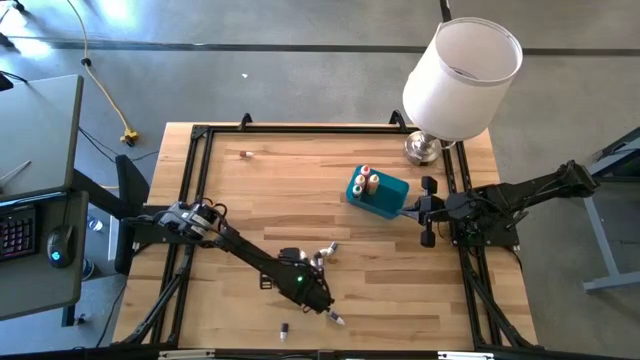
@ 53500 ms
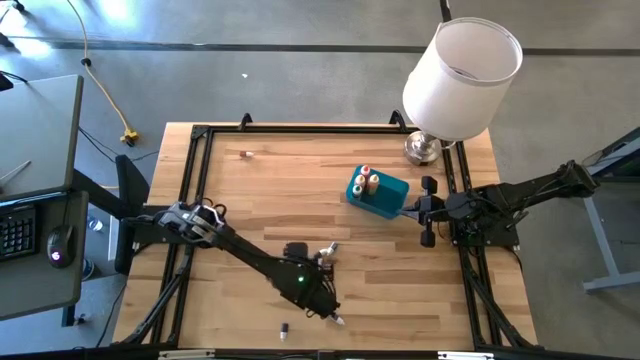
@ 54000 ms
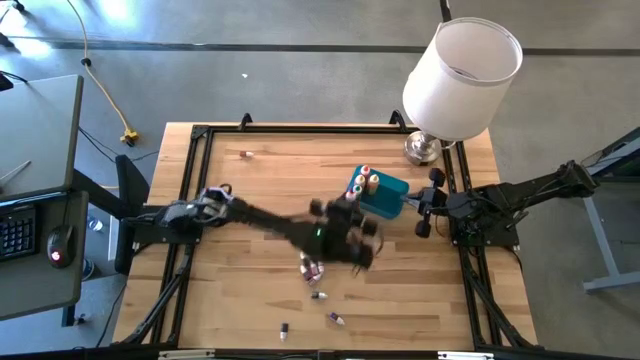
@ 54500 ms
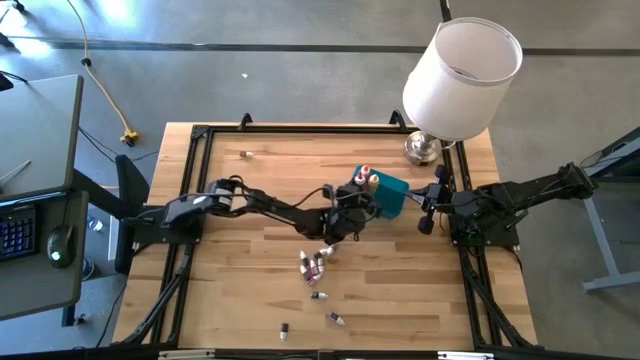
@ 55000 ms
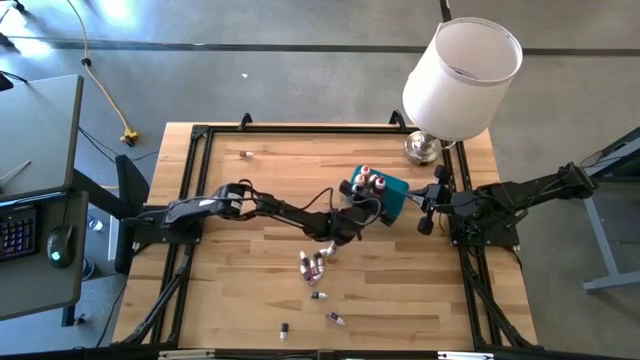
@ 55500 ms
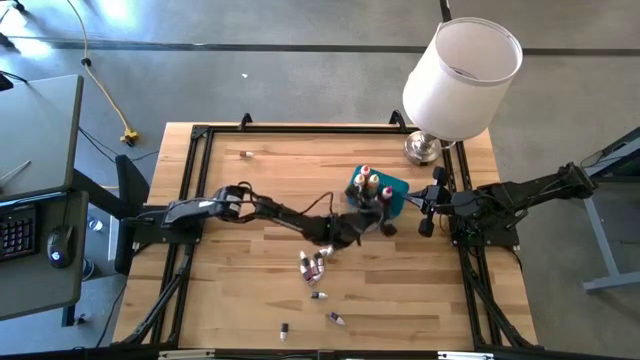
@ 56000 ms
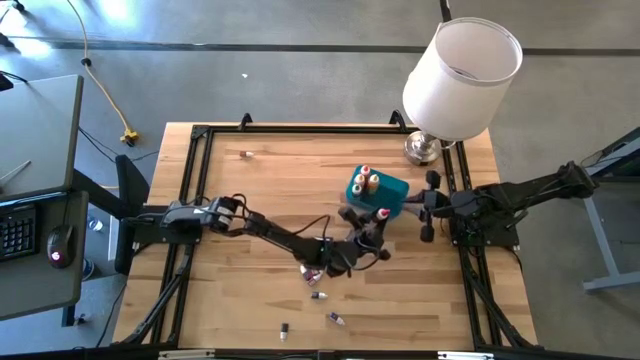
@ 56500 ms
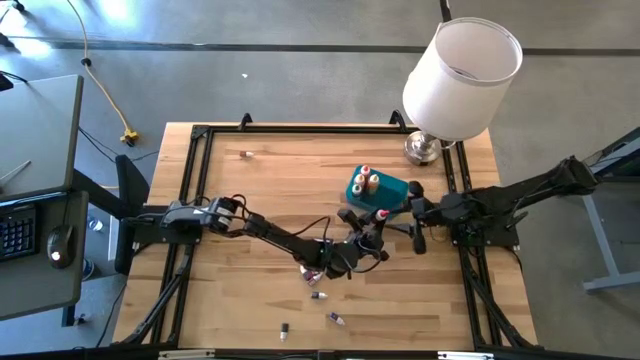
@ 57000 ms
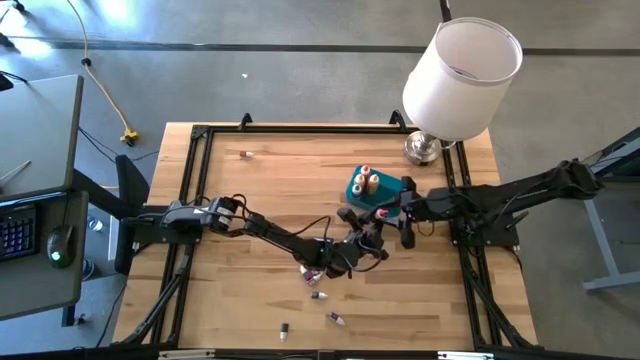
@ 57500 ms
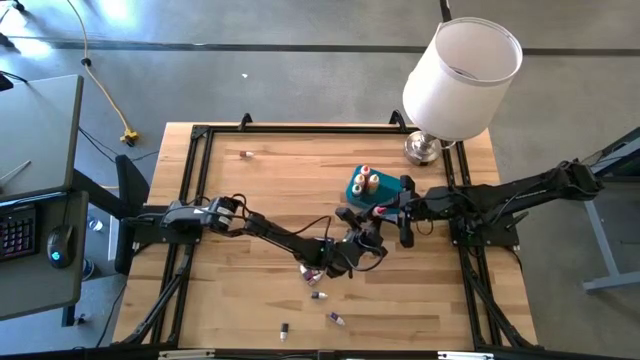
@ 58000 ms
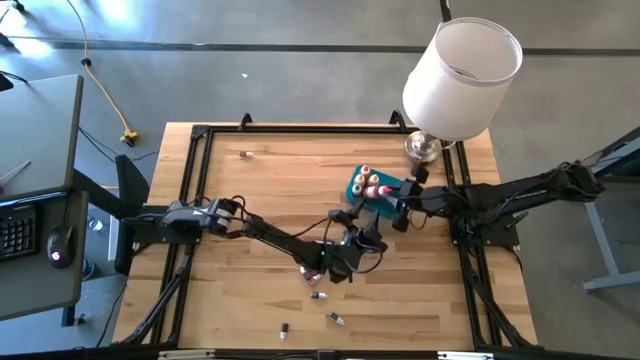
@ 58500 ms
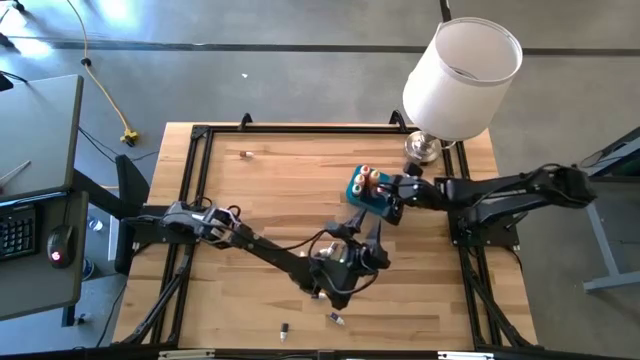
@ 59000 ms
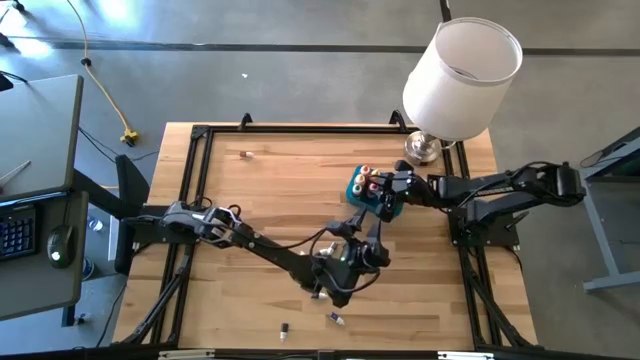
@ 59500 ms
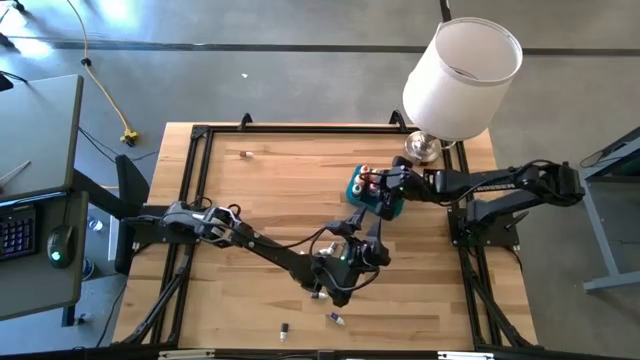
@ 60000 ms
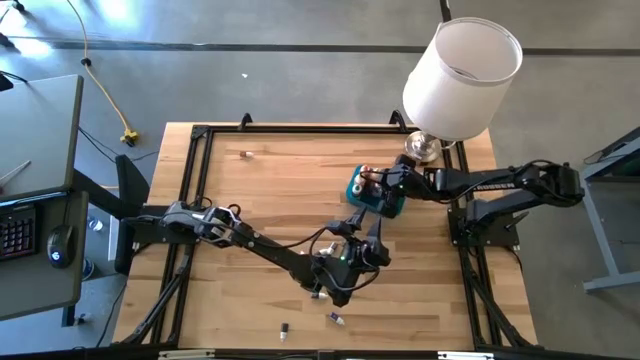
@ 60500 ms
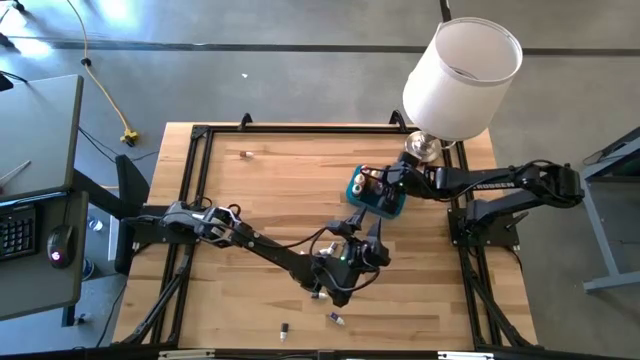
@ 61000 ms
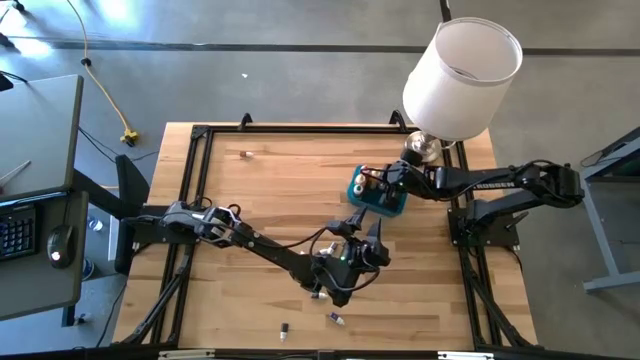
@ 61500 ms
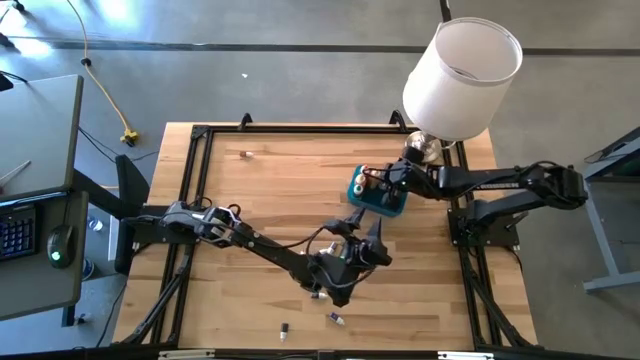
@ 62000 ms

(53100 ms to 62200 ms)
Task: Pick & Place food coloring
Put the large red food coloring bottle into the blue bin

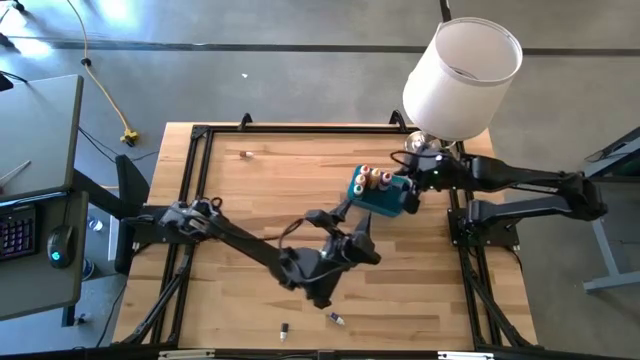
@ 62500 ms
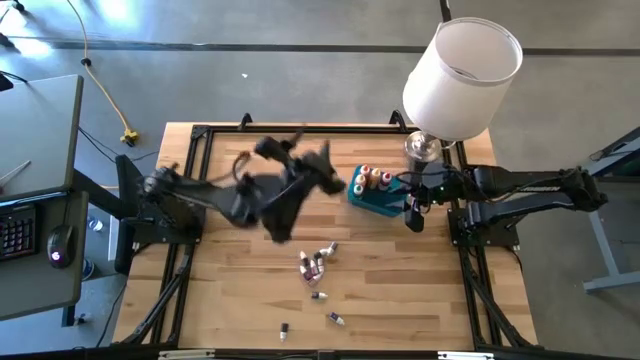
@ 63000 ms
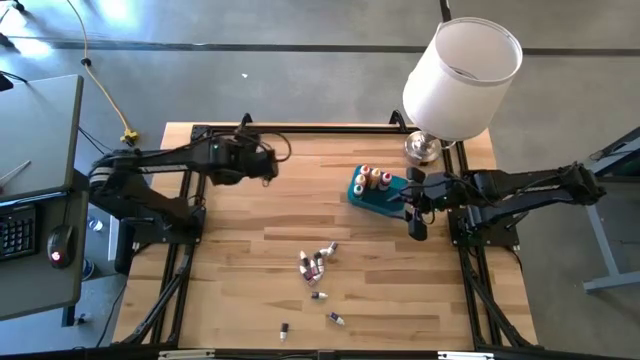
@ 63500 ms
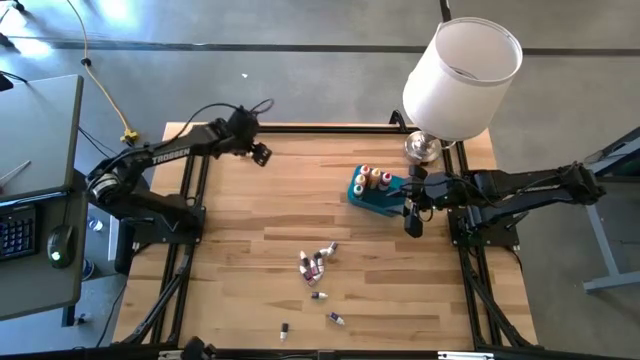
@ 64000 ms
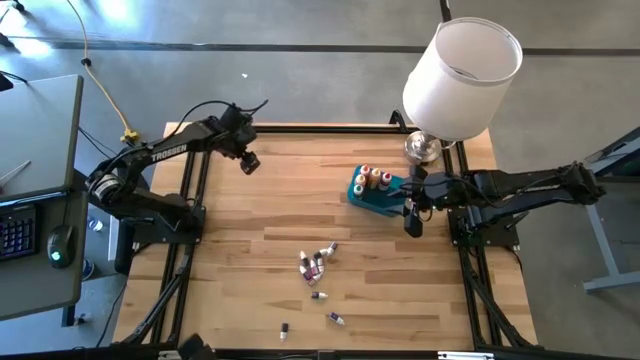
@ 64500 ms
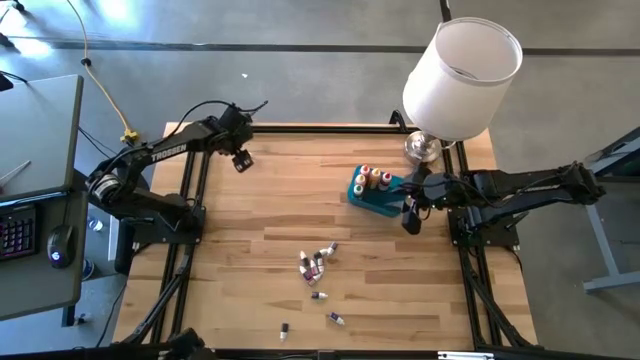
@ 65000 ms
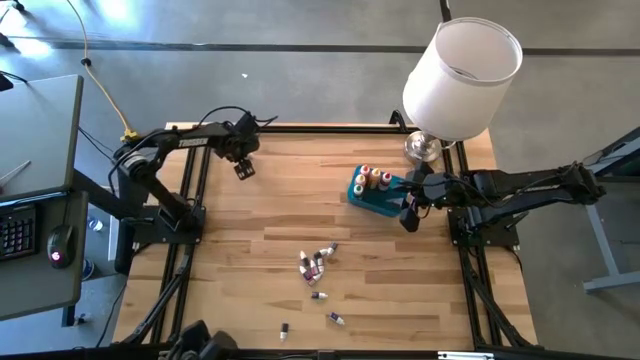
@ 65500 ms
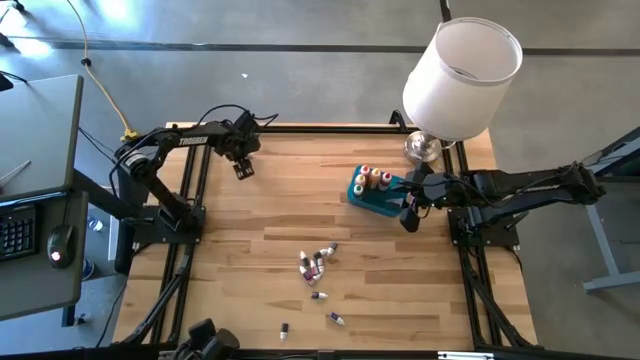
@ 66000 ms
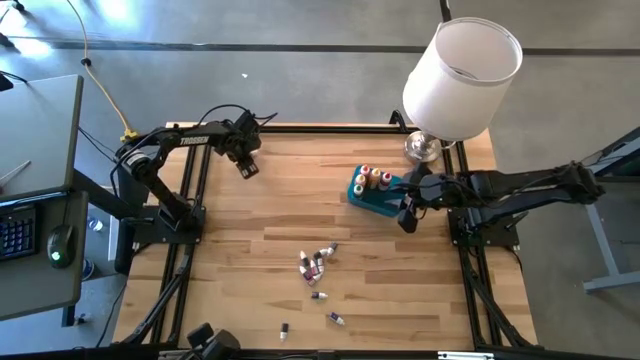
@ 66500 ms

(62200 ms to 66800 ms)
Put the small yellow food coloring bottle into the blue bin

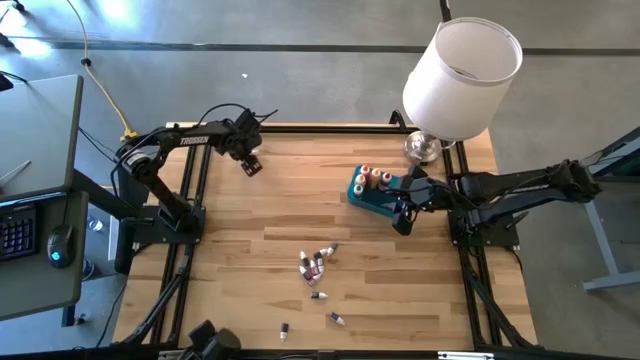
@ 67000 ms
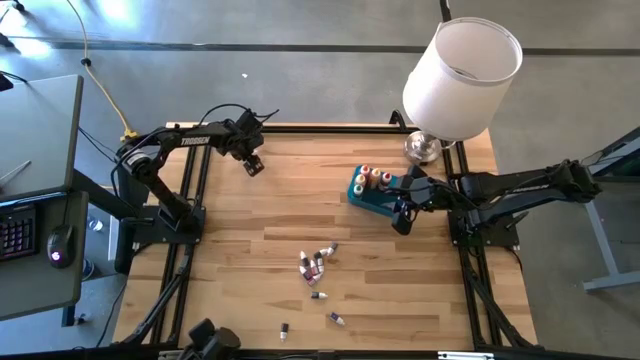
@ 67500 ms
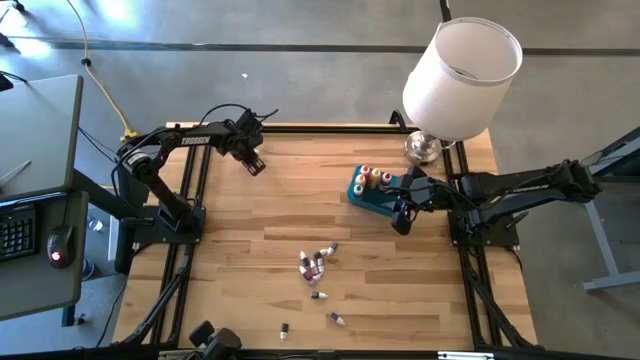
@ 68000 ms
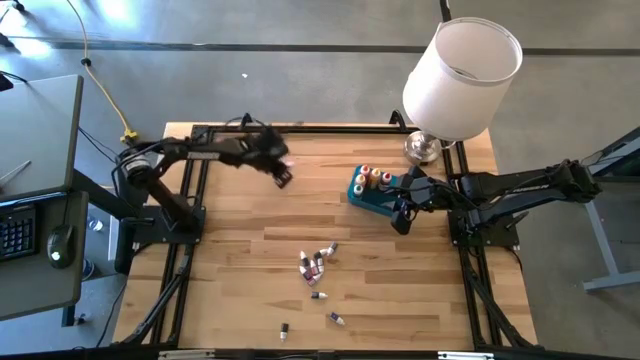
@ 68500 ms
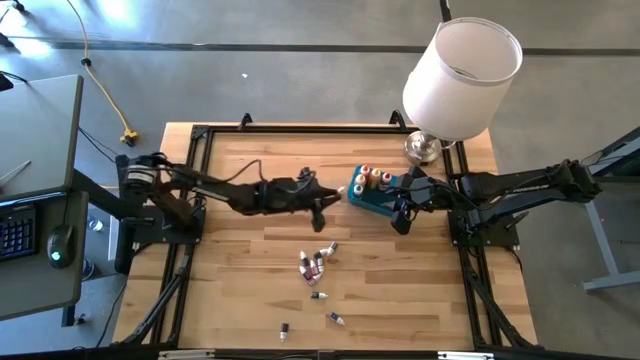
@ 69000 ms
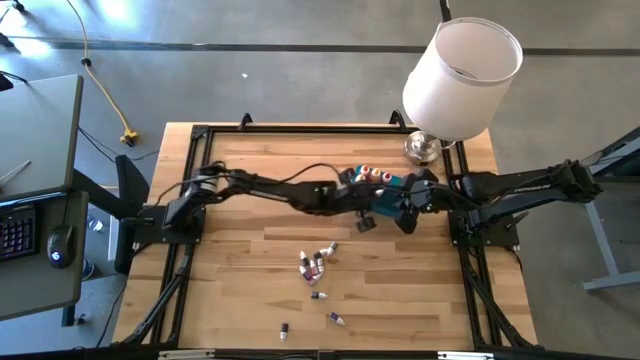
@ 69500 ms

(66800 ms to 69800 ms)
Put the small yellow food coloring bottle into the blue bin

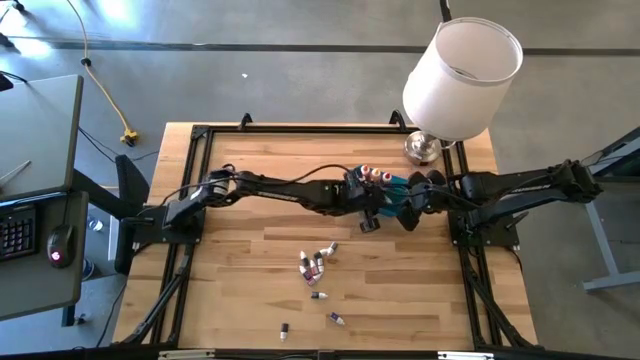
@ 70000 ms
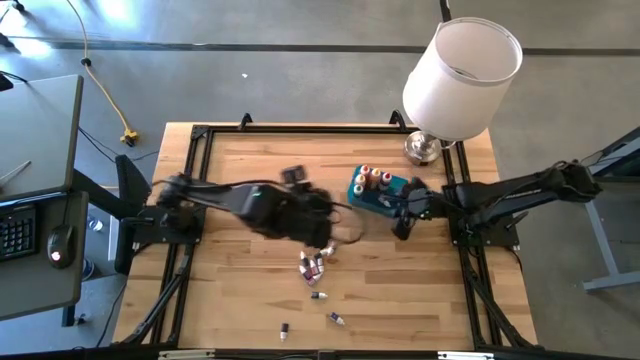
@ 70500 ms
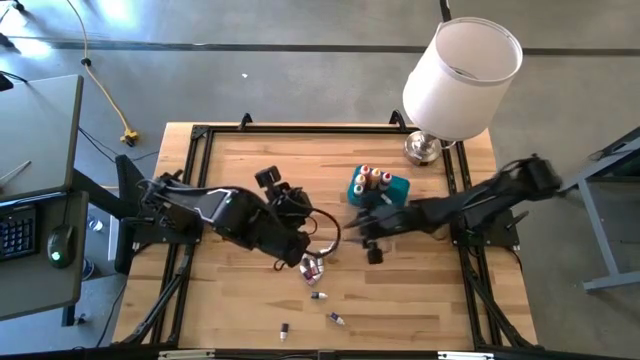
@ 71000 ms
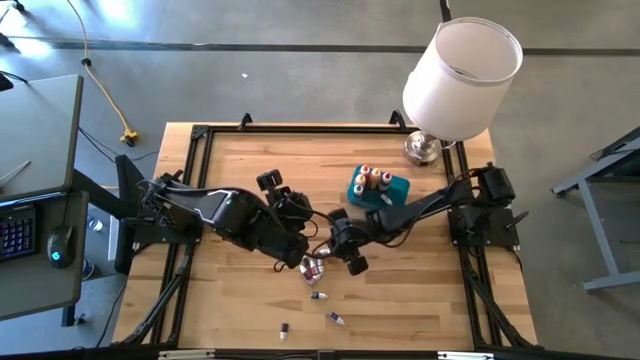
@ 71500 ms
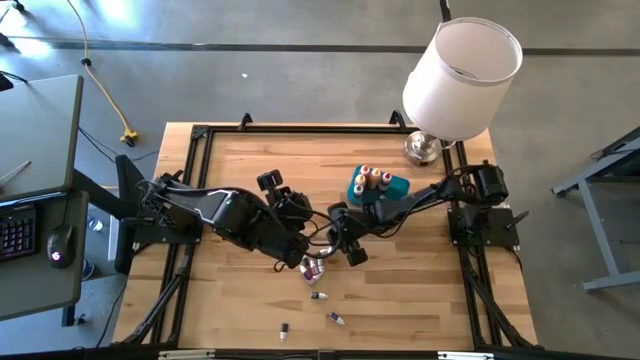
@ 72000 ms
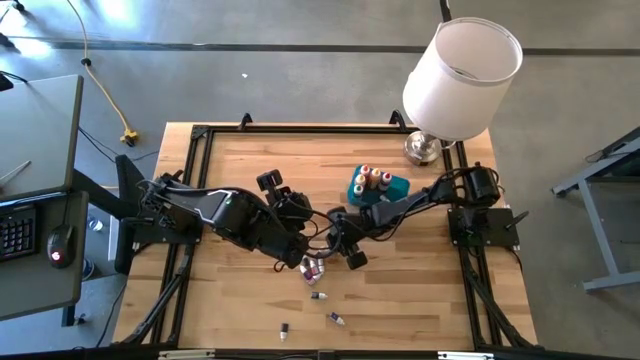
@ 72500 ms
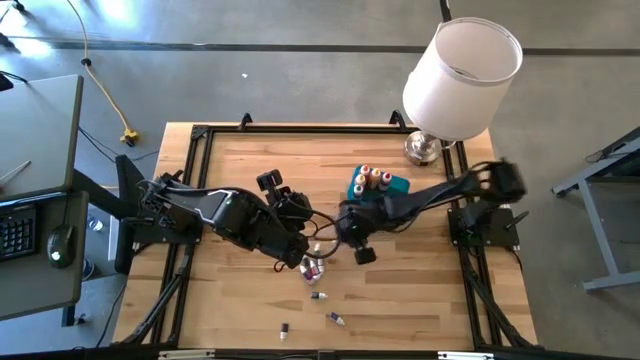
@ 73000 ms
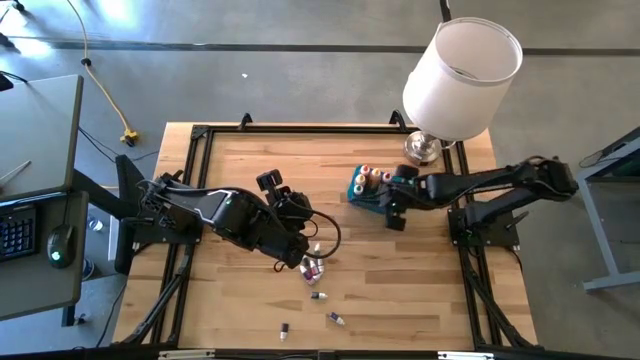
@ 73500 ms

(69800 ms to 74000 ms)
Put the small dark green food coloring bottle into the blue bin
